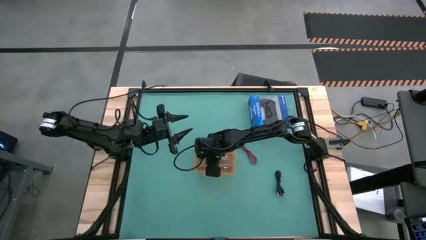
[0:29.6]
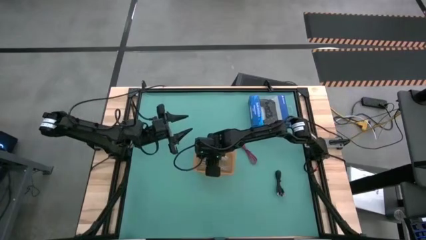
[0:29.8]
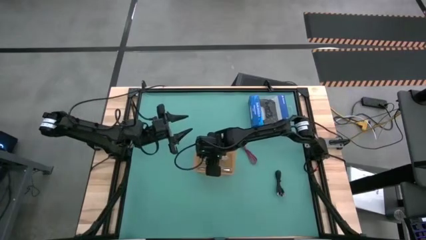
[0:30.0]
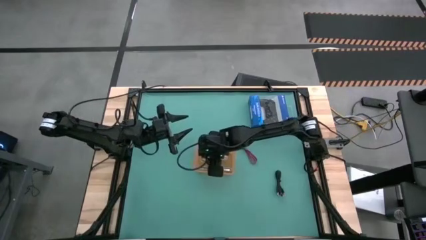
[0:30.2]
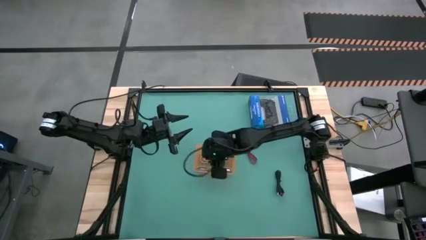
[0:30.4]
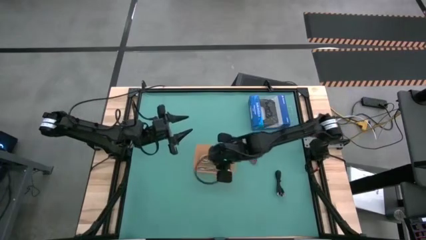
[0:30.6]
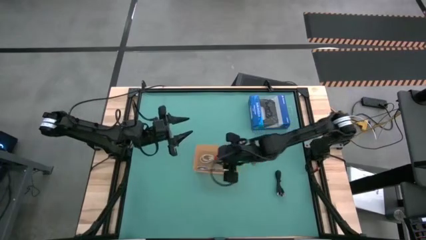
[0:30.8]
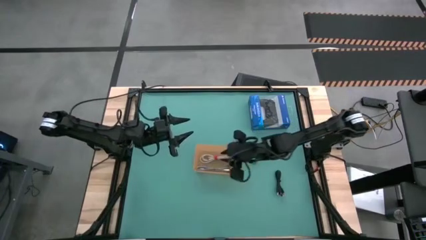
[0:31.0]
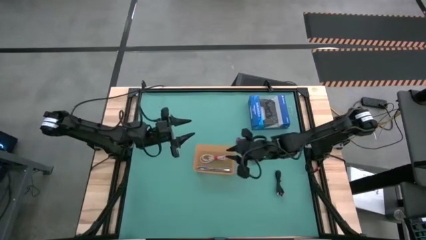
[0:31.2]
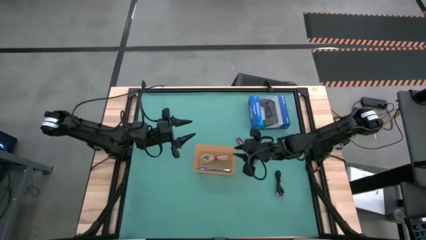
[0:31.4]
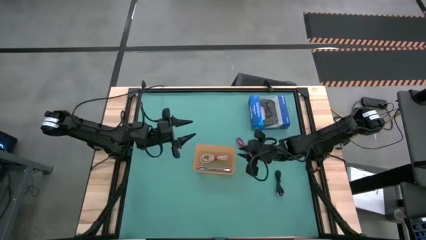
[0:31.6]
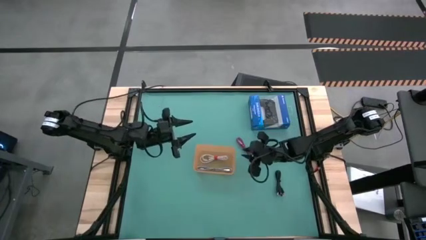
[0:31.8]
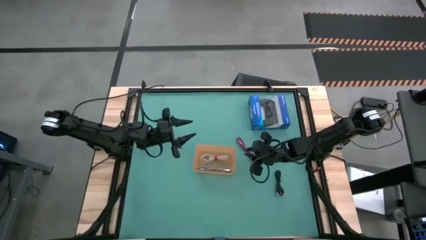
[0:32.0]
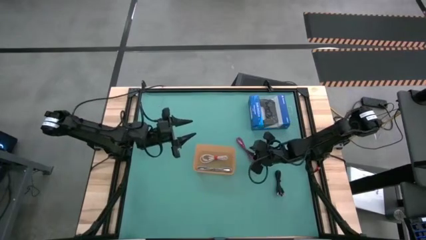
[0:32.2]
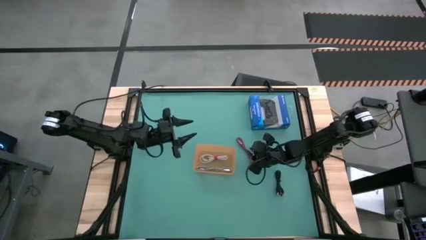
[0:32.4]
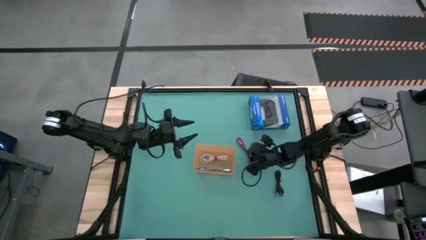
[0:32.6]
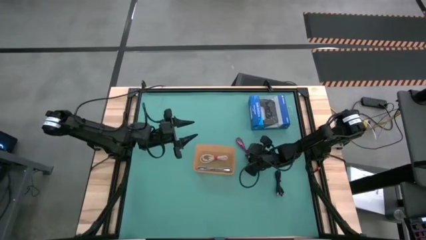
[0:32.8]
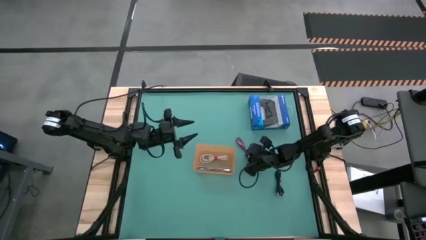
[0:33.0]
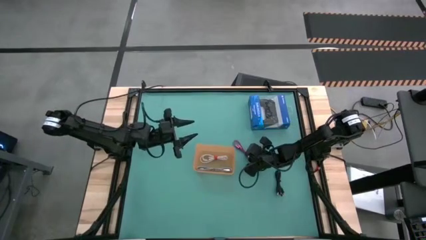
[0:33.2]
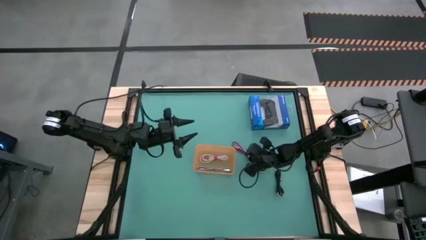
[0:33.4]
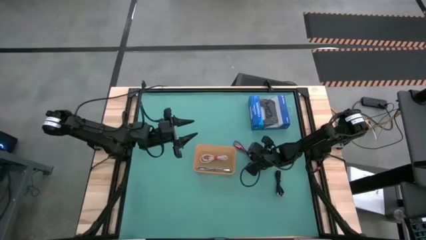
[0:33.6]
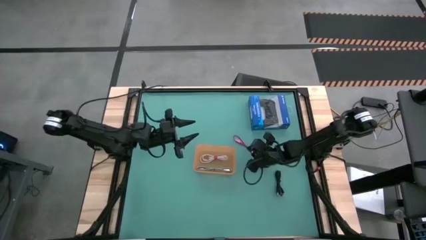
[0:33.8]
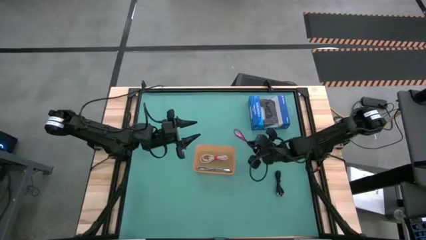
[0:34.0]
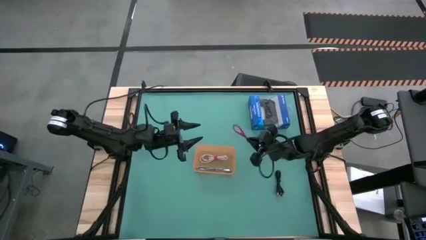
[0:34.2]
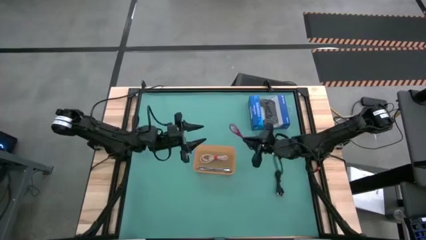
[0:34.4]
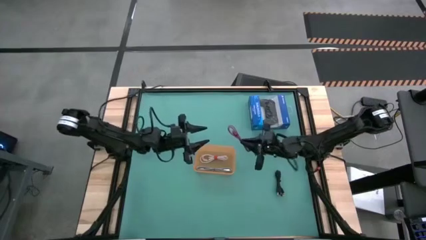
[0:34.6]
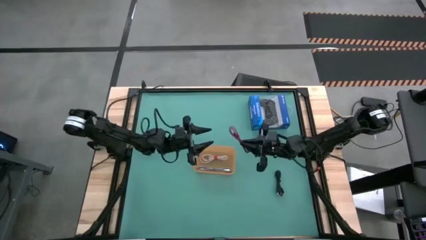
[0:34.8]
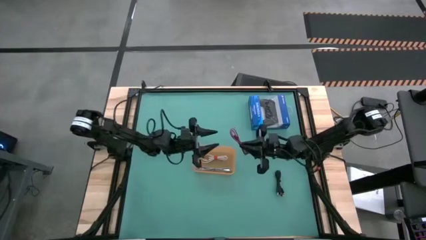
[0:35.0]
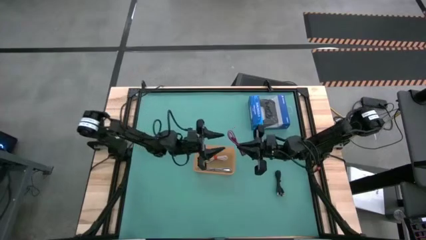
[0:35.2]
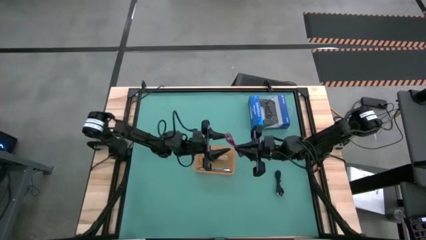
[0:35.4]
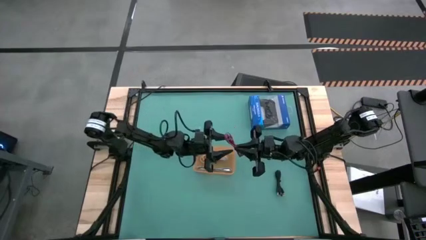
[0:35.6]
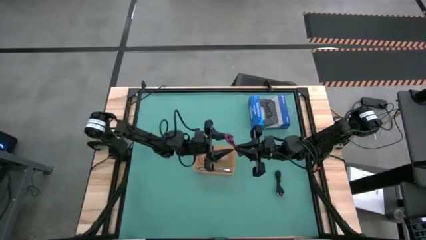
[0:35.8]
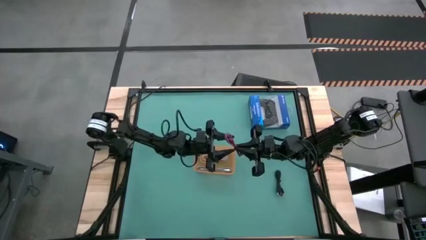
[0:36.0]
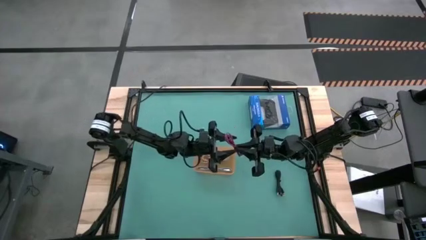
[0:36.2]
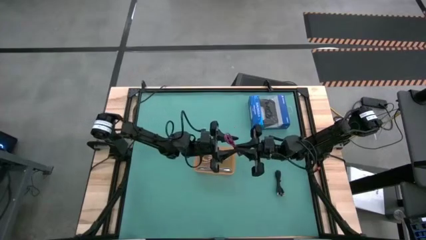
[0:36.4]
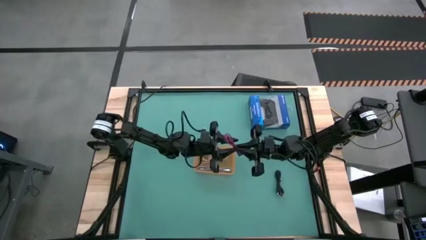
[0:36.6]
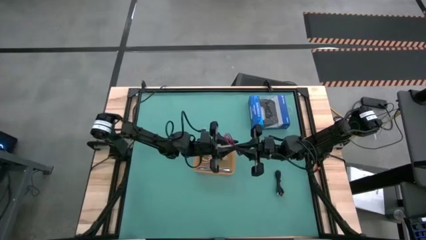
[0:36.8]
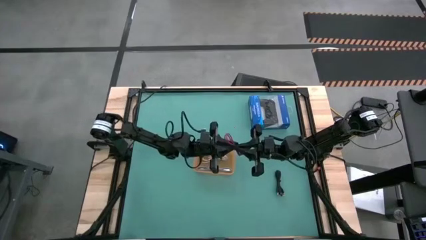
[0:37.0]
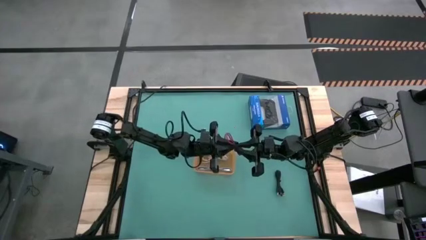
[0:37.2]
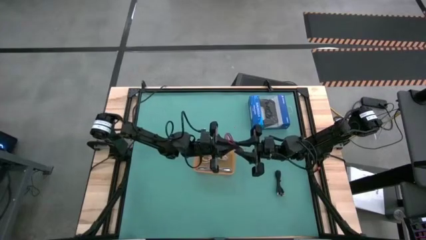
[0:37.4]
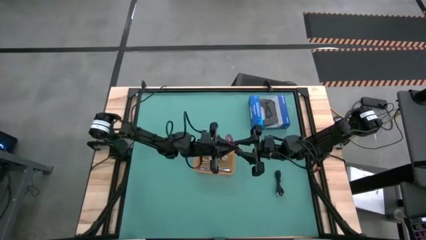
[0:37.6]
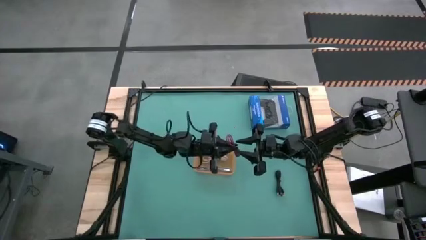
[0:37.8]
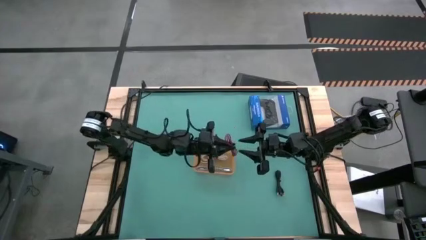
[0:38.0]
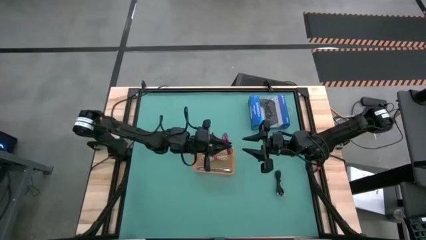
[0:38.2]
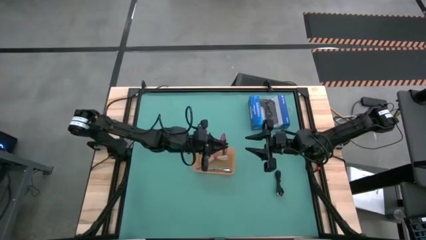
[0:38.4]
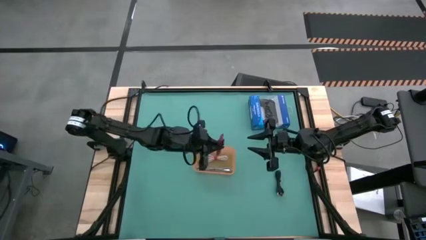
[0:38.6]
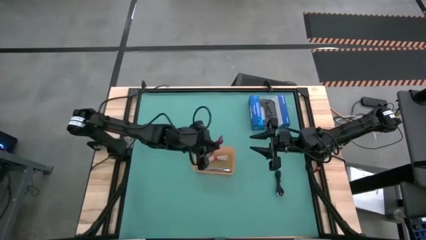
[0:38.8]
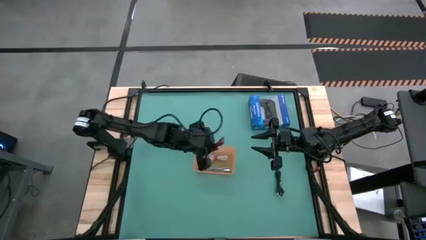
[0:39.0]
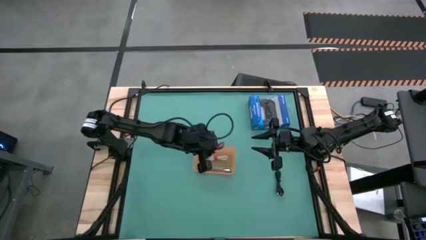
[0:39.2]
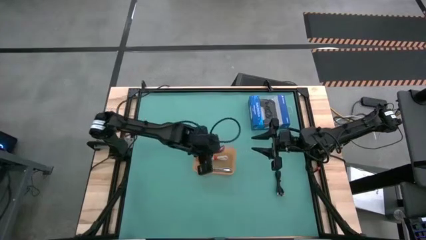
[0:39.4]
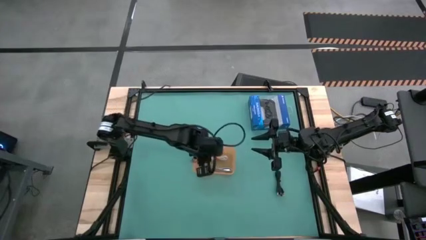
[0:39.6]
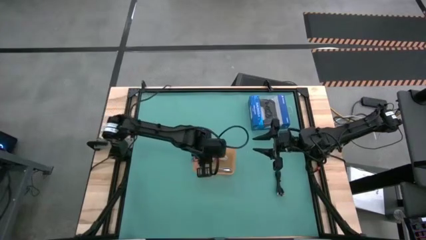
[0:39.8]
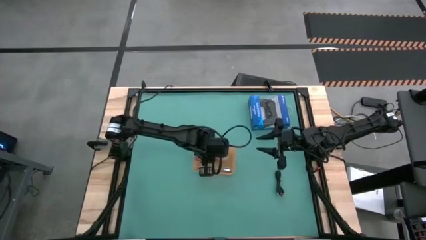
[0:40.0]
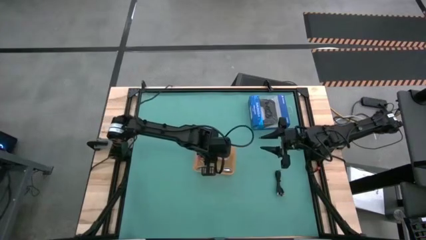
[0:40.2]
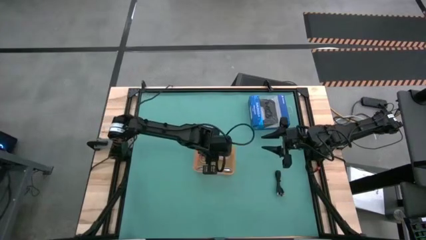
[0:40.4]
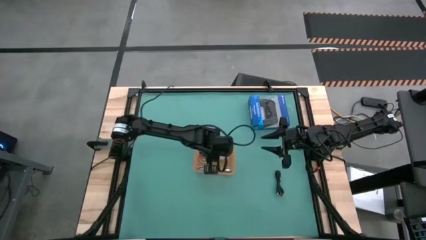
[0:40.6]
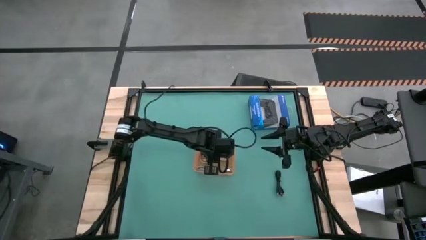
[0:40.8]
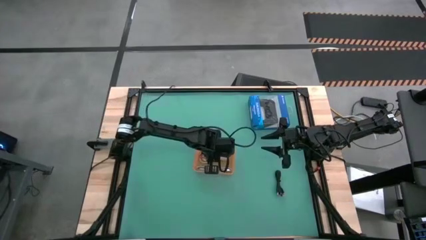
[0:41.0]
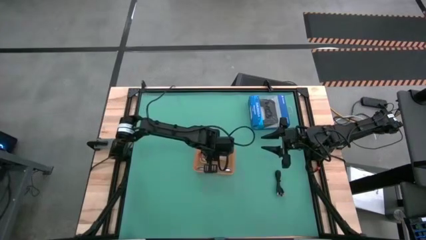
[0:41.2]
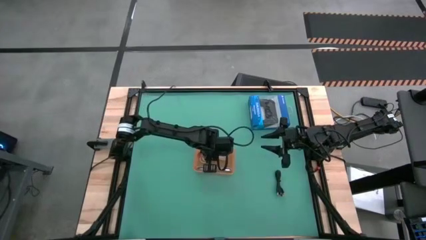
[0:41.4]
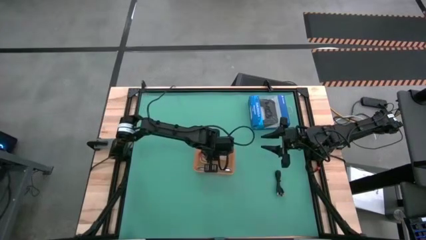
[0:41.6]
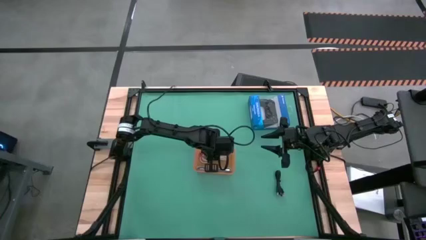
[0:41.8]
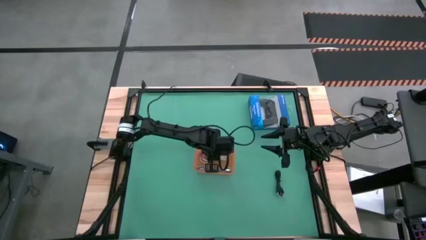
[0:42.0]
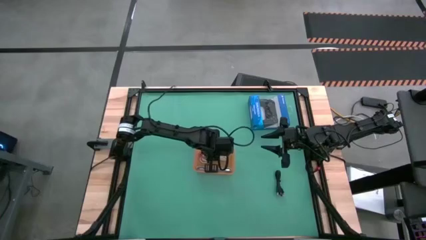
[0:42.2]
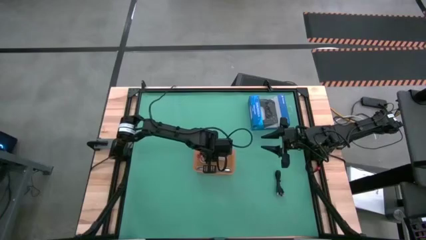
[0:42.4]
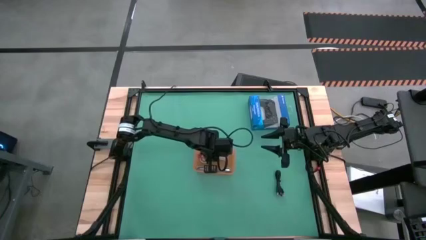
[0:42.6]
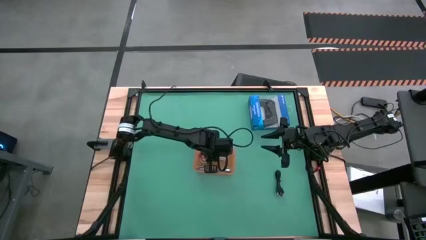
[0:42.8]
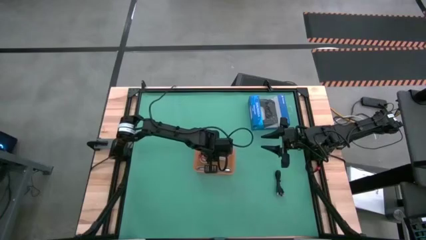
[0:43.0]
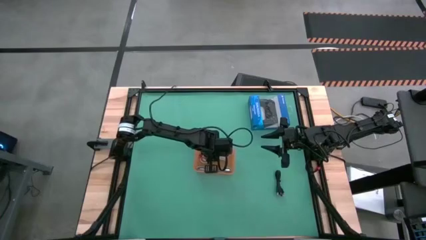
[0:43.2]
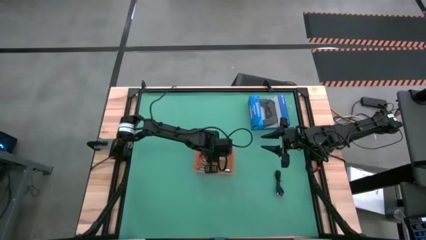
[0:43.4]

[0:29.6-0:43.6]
Task: Pick and place USB-C Cables
Put the black red charger cable into the orange bin
